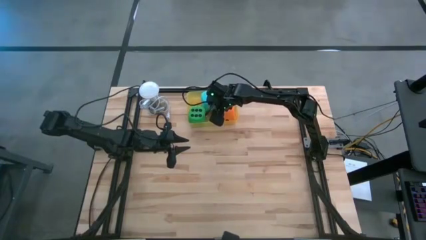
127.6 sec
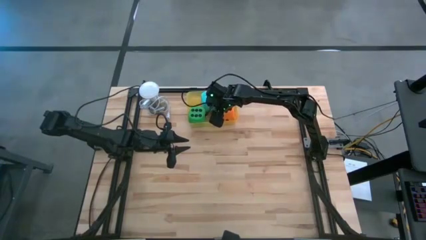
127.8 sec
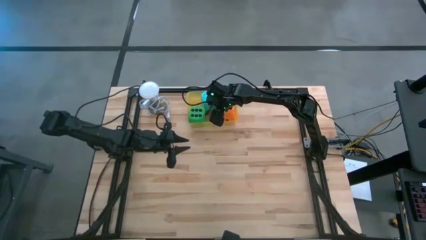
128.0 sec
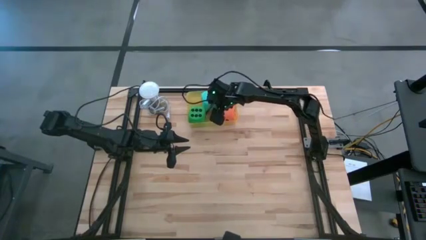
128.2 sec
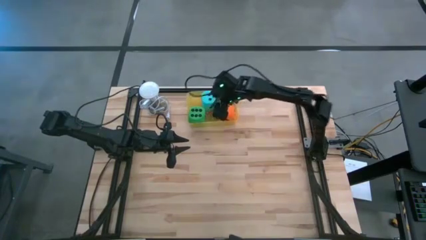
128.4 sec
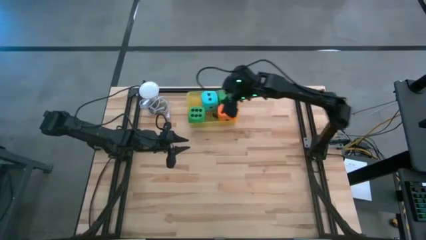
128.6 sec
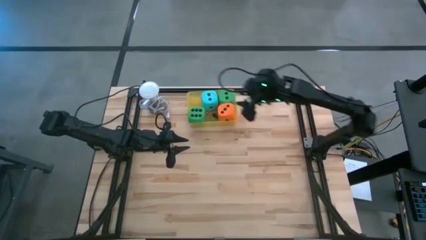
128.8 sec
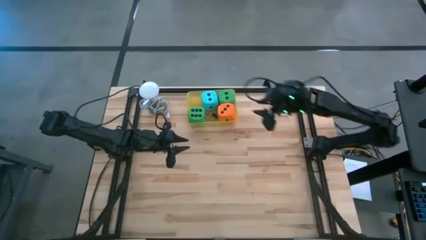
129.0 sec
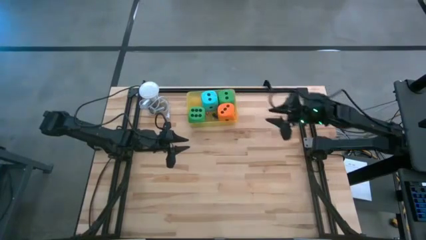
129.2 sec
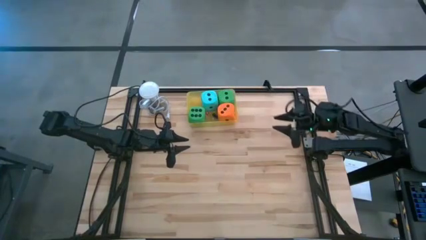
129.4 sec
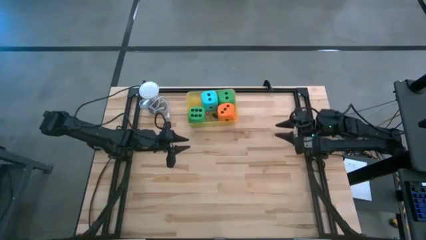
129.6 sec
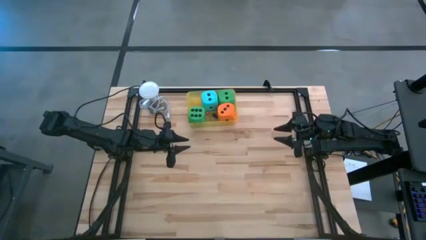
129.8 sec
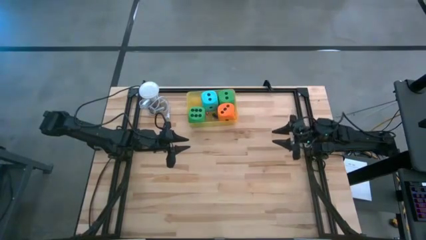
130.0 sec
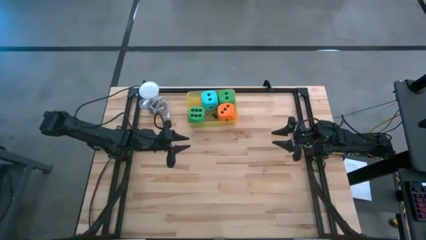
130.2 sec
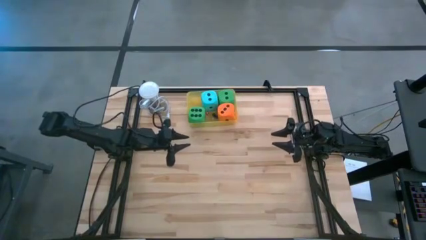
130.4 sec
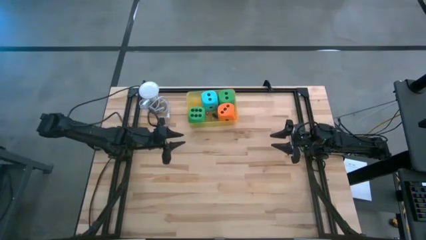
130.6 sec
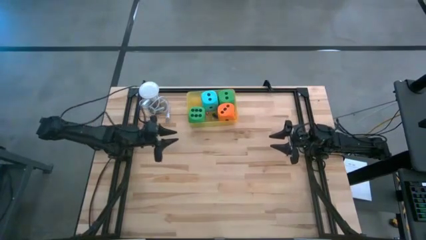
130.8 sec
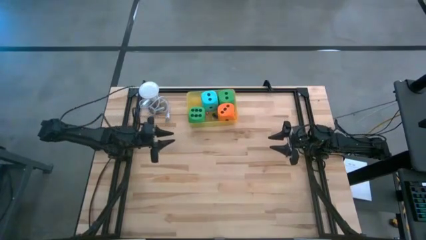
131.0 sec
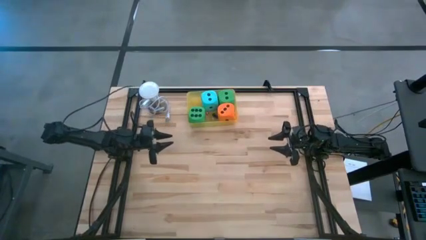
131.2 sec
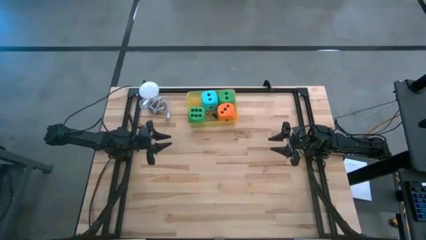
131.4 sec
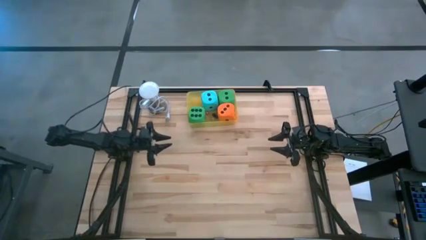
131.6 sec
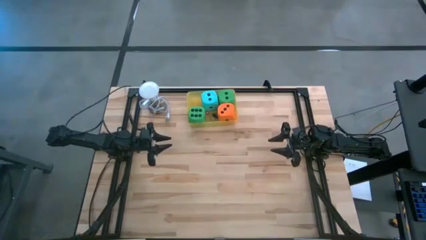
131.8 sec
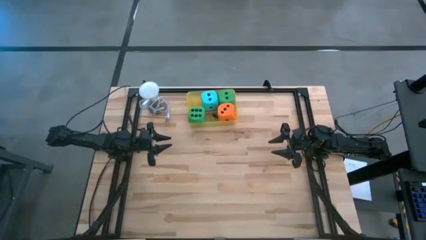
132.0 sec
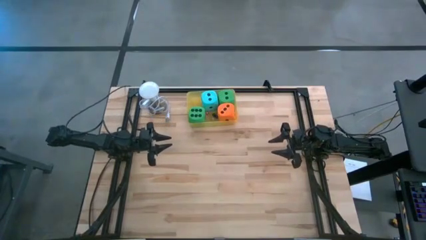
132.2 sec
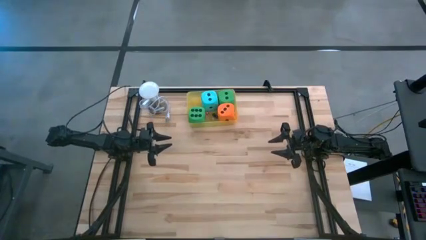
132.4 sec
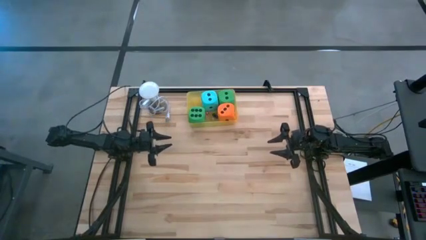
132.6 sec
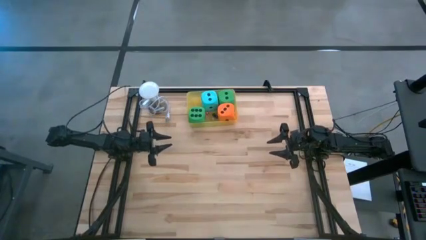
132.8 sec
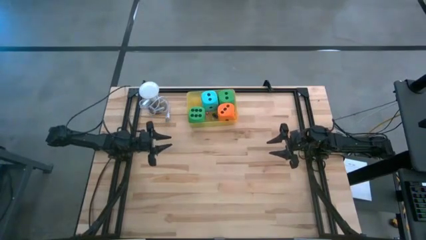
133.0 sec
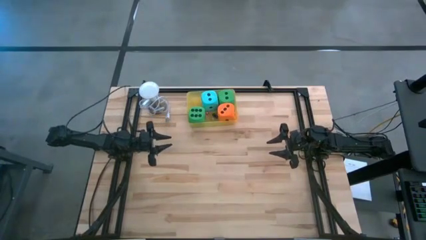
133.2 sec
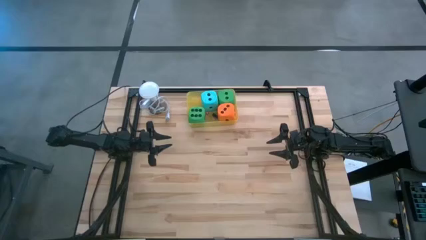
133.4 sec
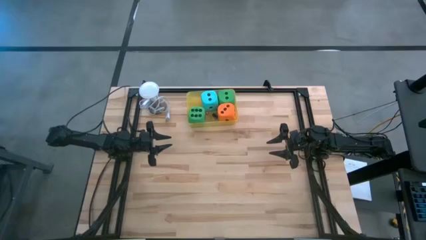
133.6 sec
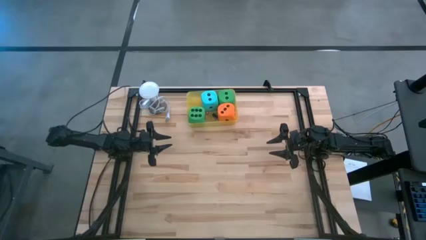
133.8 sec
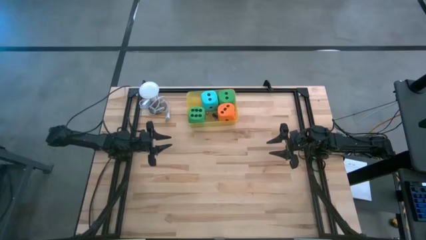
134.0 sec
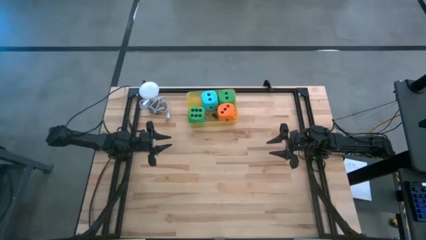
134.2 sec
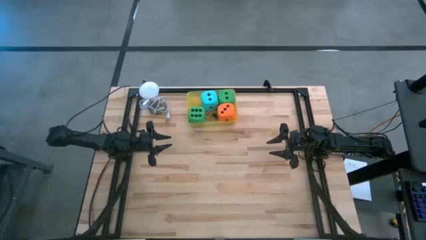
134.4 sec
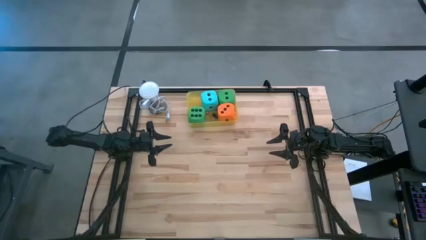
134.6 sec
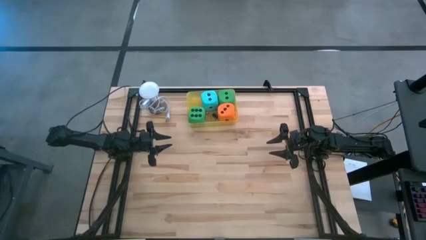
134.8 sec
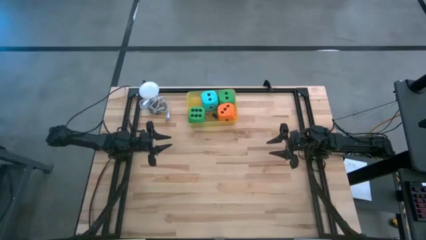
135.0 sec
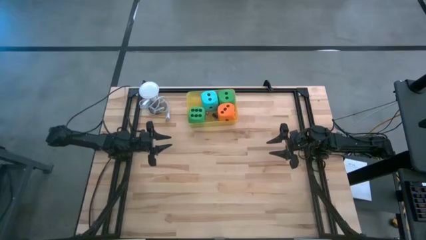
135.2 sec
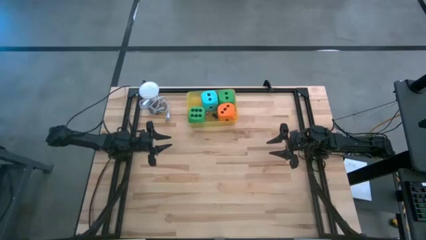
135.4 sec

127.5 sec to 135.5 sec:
Task: Pick & Place Dice
Return to Home Position
